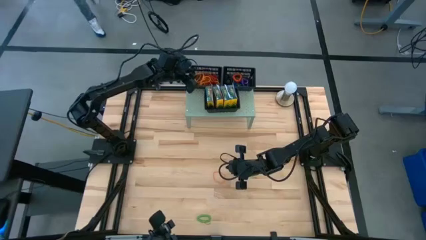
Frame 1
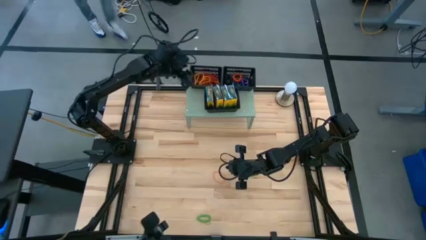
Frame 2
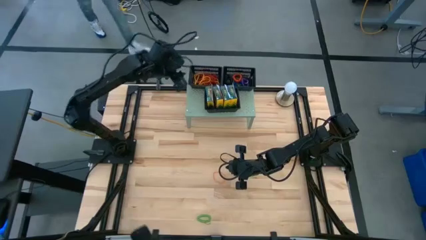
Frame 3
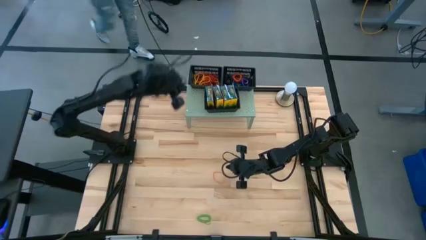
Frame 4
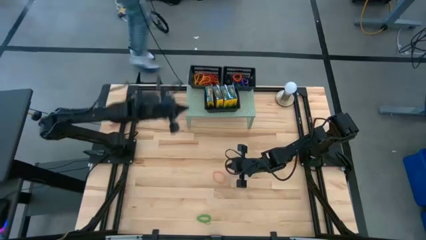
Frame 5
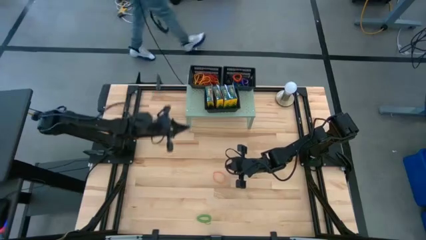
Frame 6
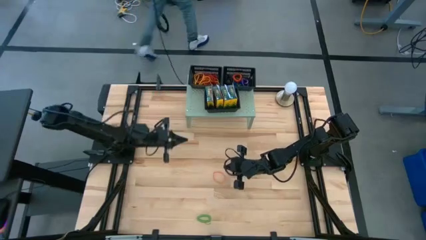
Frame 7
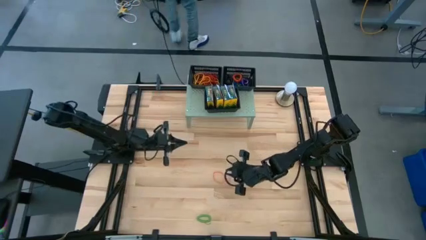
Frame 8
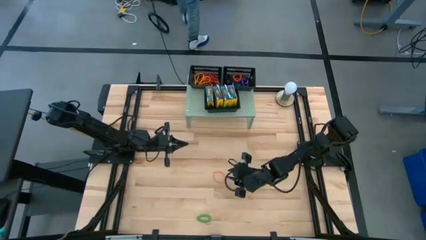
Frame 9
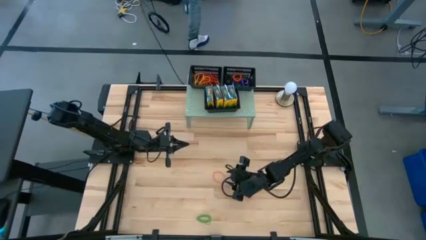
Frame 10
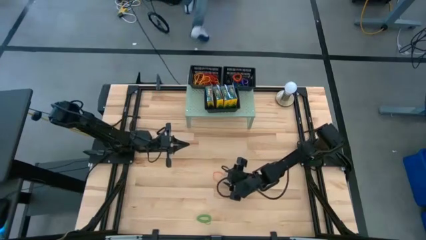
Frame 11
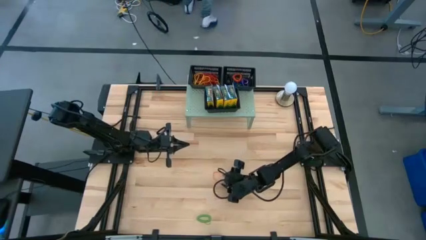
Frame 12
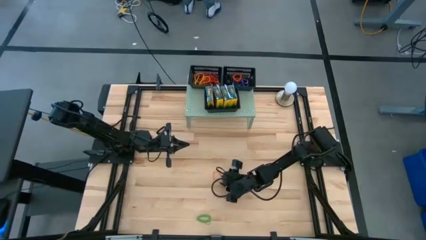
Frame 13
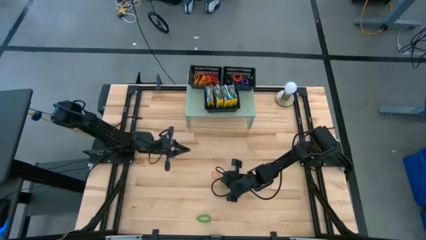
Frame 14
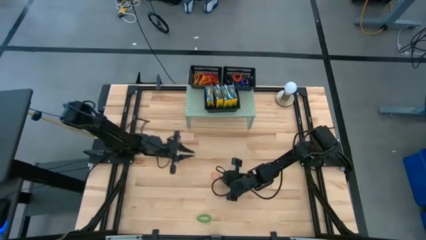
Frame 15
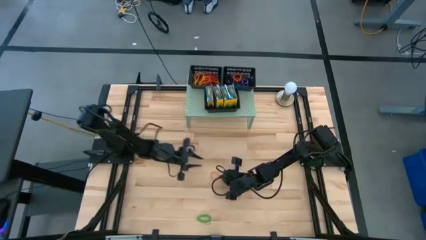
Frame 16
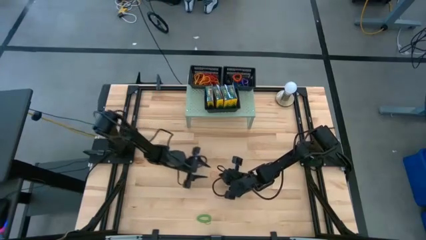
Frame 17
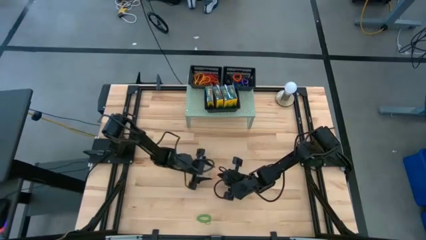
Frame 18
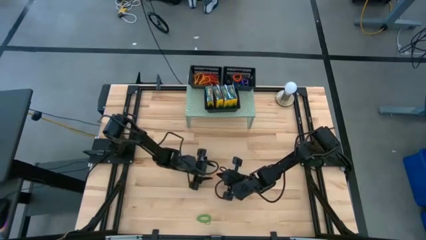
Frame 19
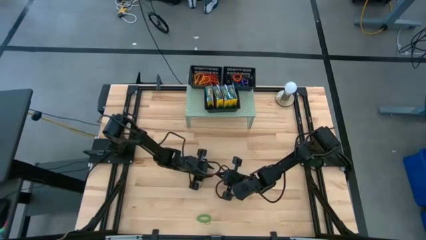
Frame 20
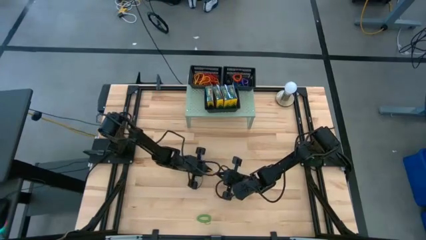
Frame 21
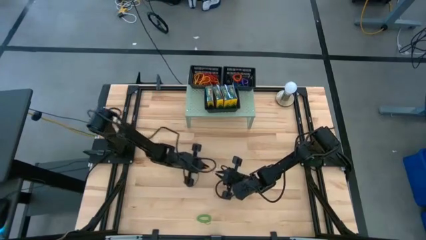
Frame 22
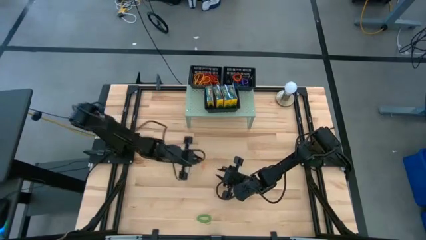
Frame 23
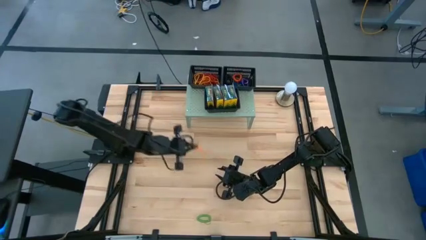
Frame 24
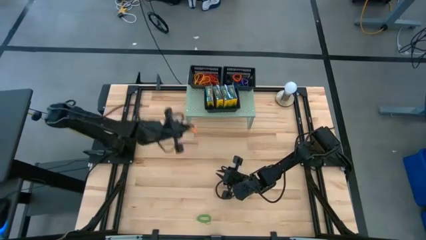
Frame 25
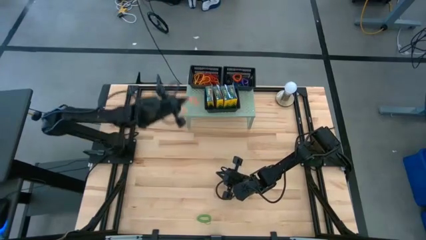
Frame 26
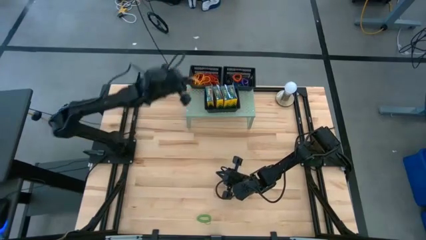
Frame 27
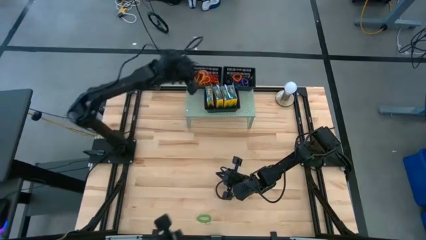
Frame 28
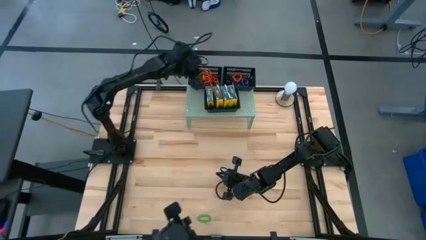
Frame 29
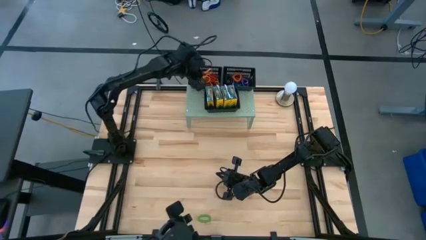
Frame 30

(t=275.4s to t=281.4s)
Task: Pick & Place Office Desk Supplies
Put the orange rubberband into the top left black bin

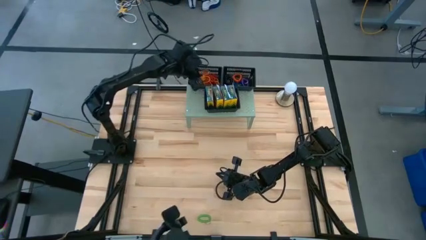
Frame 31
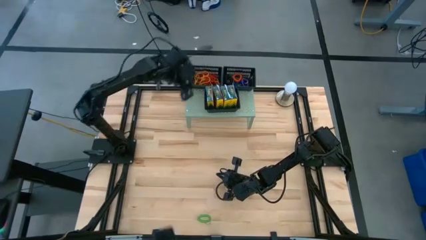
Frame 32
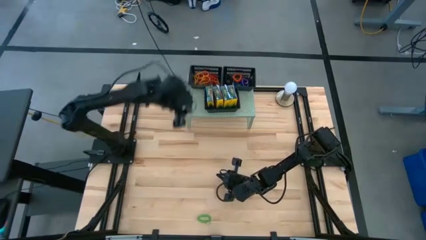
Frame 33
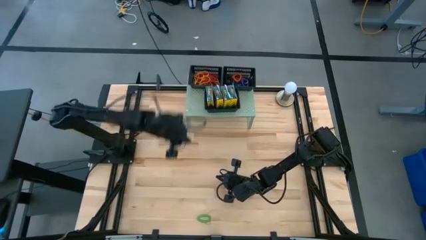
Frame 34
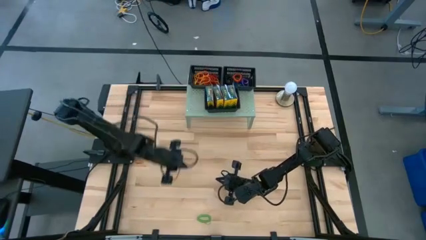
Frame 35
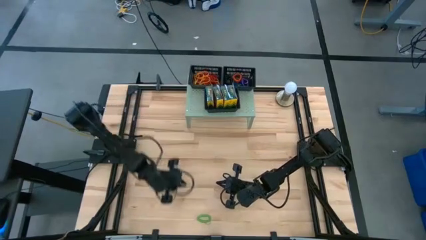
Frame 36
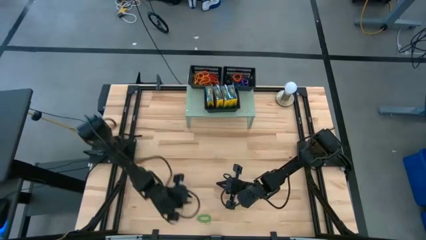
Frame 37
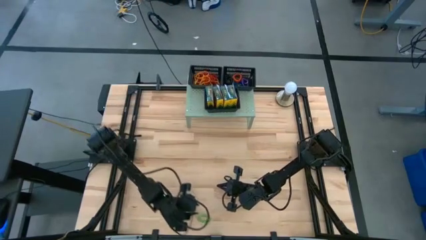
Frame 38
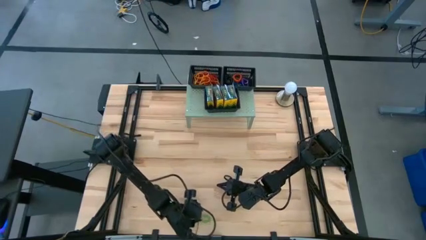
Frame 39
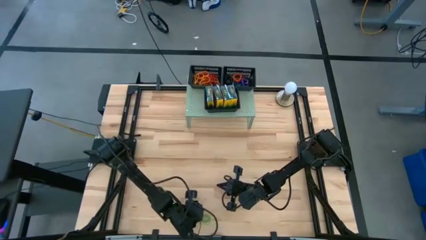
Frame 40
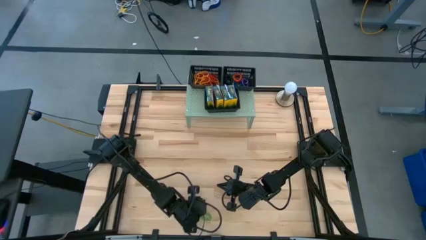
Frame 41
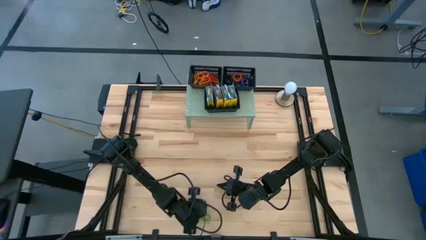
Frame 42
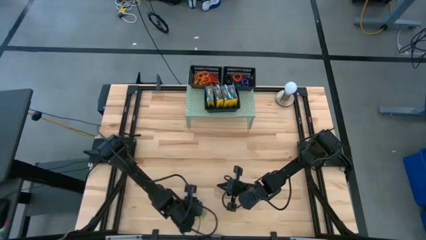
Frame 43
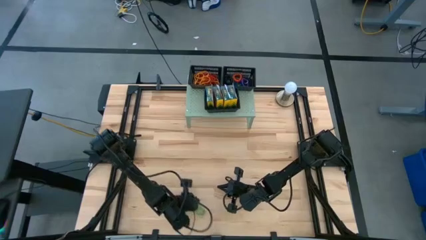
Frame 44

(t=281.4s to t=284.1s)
Put the green spiral keychain the top right black bin

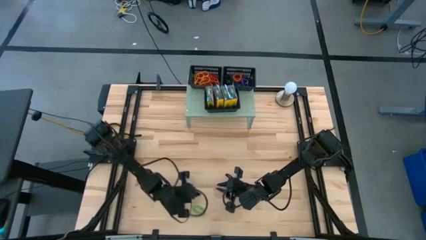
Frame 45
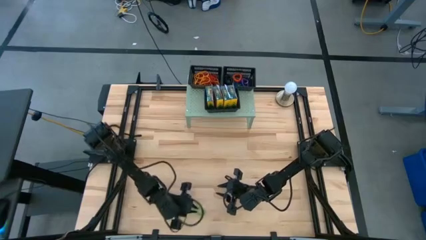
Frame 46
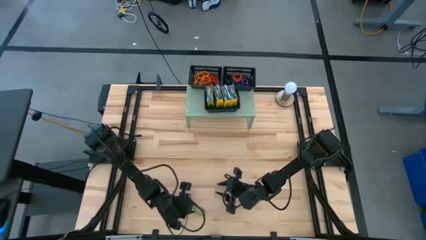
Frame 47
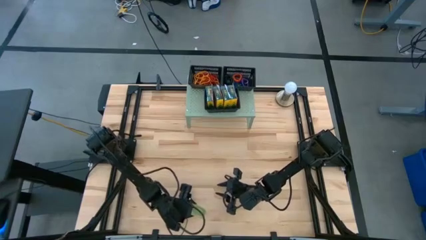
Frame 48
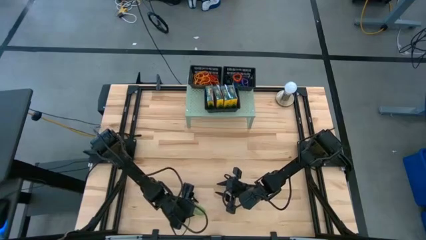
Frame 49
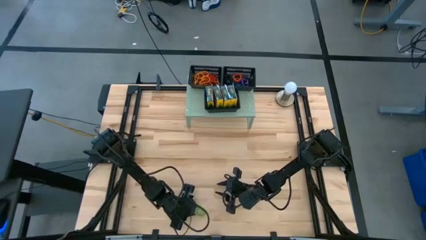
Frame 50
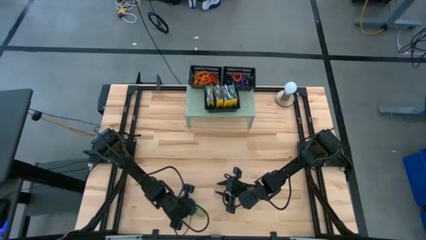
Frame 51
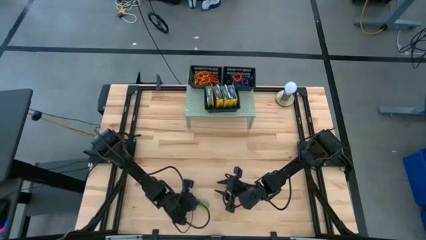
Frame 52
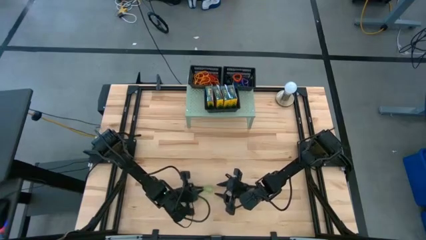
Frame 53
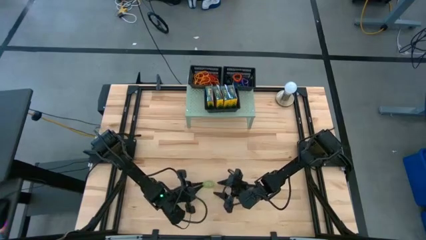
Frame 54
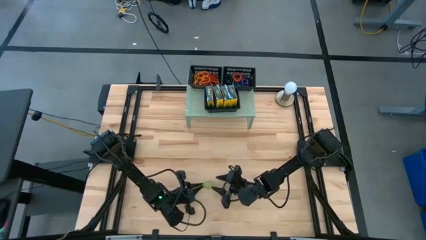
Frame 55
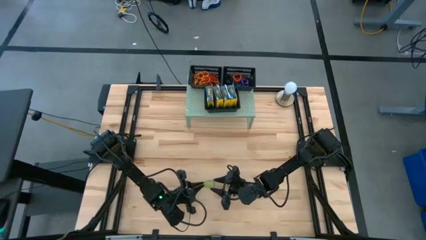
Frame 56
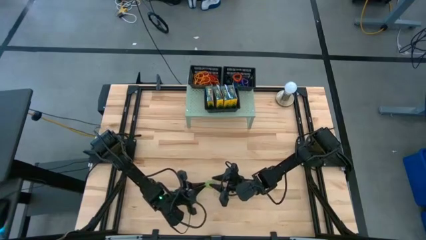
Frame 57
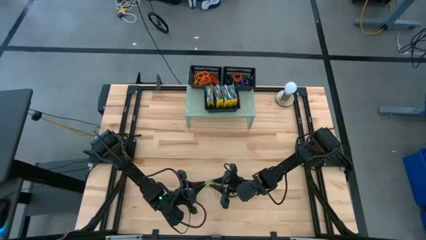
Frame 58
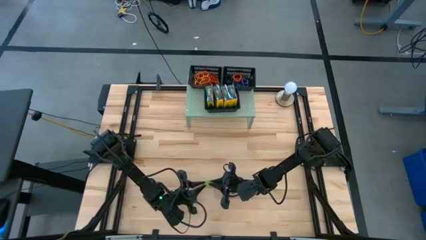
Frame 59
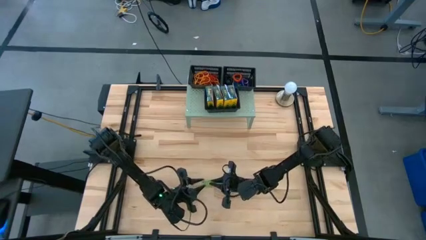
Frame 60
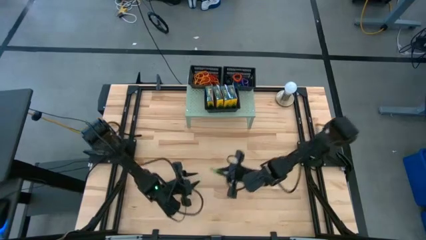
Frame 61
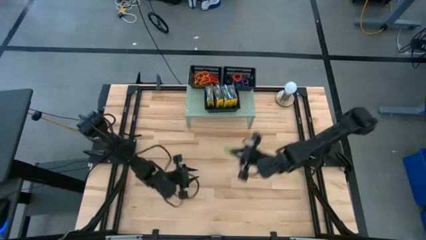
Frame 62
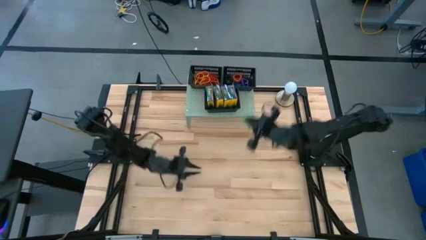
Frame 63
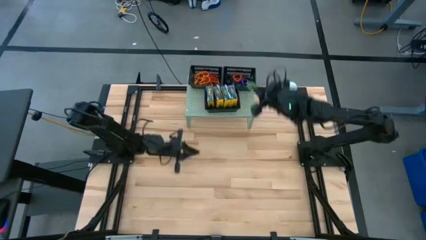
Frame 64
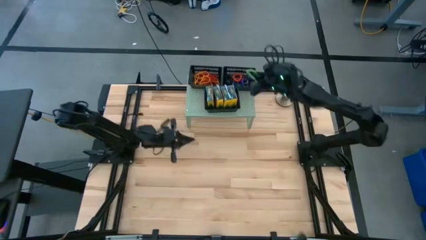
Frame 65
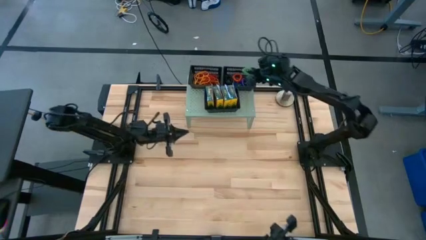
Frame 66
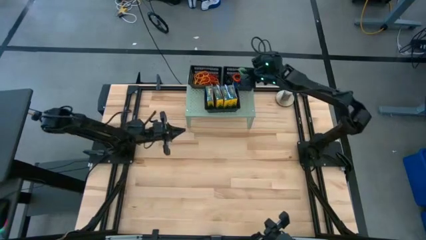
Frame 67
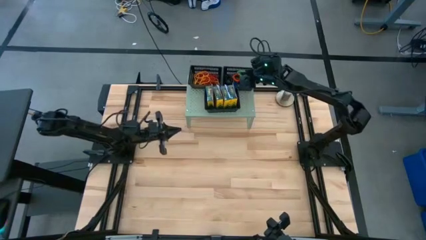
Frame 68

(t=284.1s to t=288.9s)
Put the green spiral keychain the top right black bin
